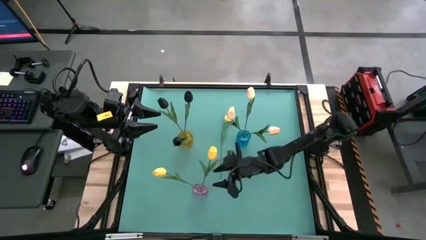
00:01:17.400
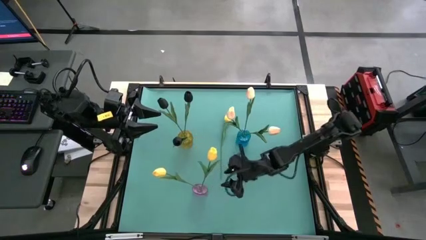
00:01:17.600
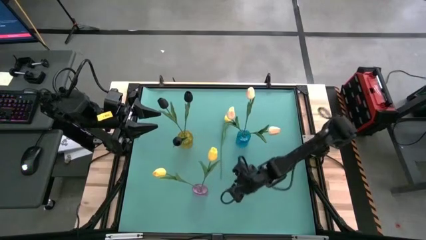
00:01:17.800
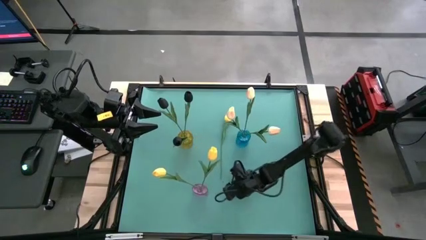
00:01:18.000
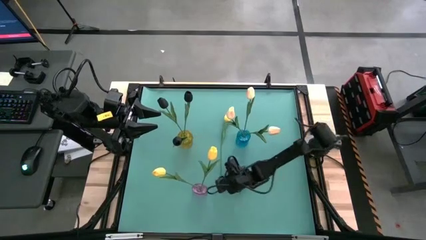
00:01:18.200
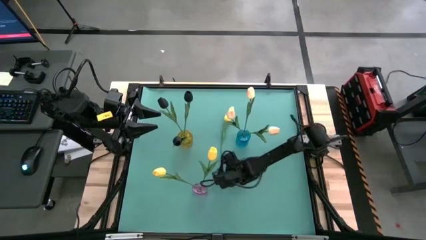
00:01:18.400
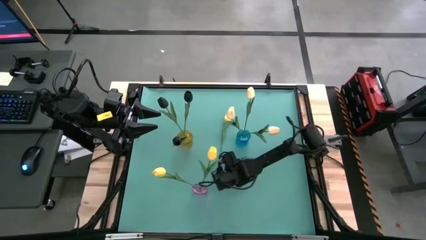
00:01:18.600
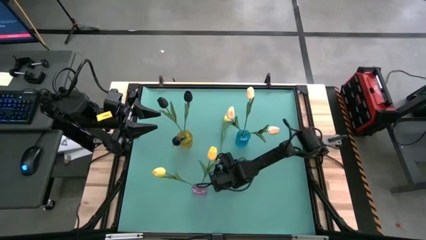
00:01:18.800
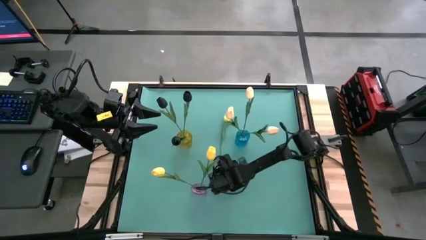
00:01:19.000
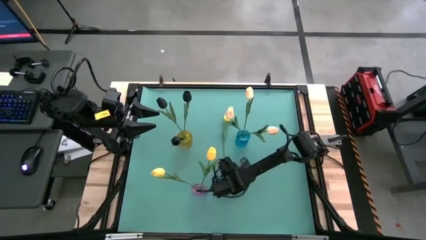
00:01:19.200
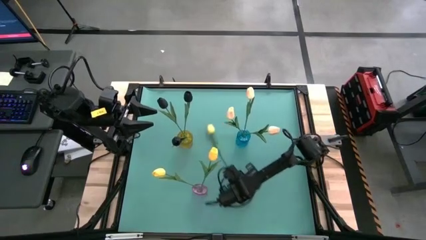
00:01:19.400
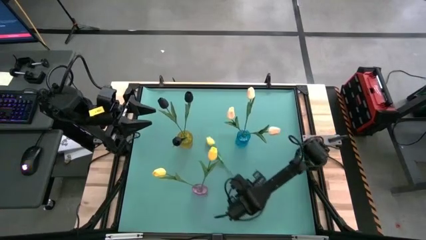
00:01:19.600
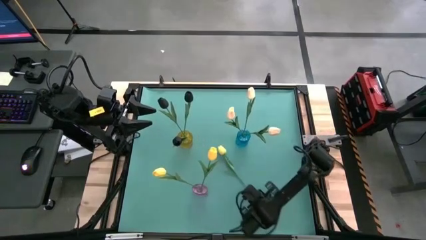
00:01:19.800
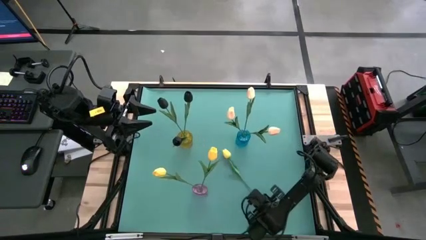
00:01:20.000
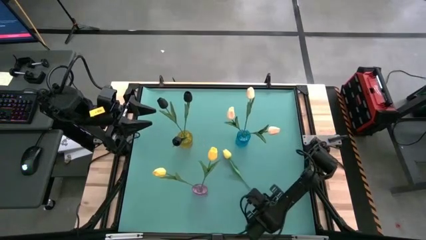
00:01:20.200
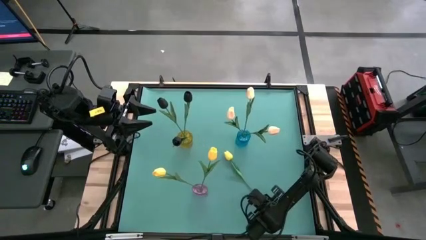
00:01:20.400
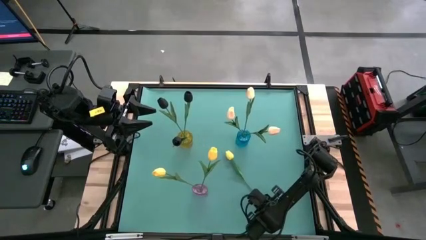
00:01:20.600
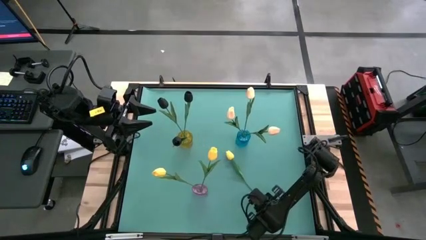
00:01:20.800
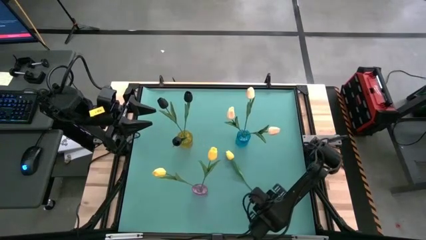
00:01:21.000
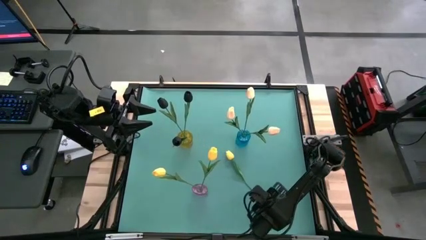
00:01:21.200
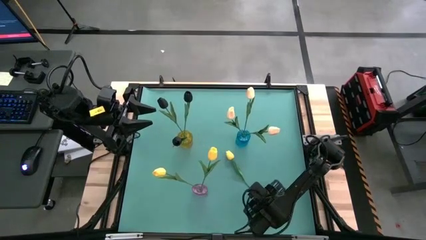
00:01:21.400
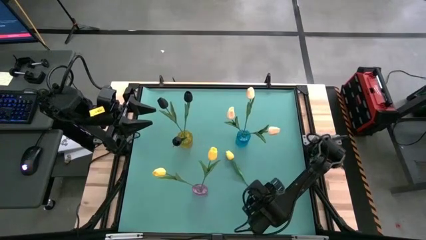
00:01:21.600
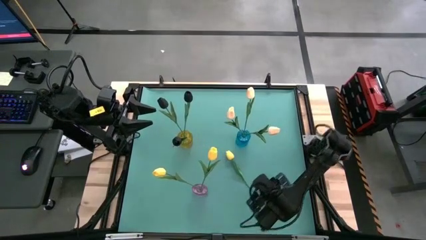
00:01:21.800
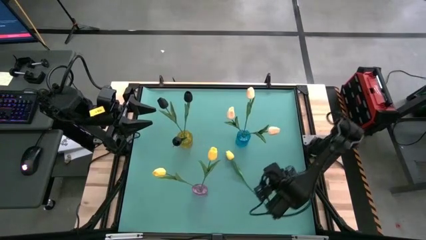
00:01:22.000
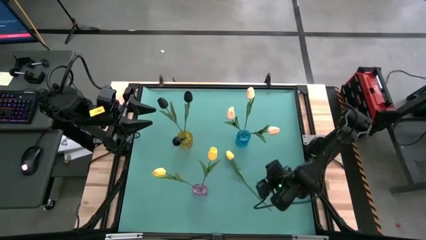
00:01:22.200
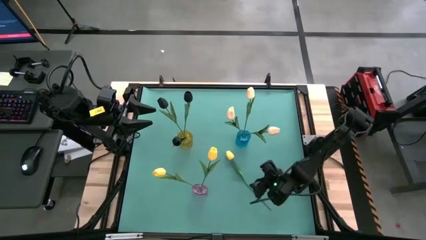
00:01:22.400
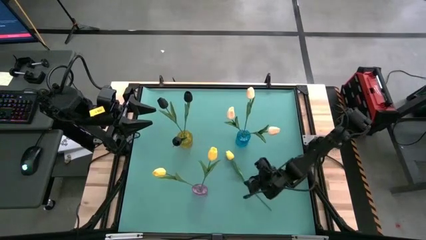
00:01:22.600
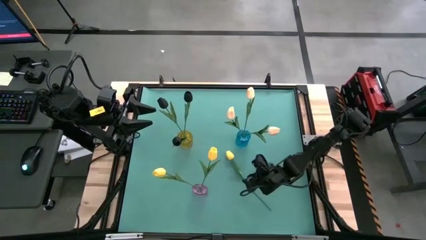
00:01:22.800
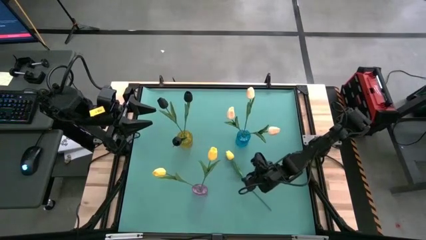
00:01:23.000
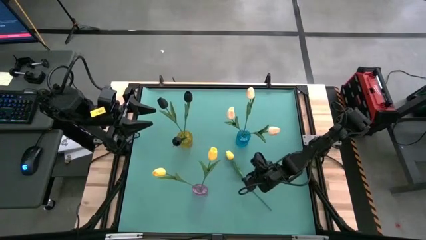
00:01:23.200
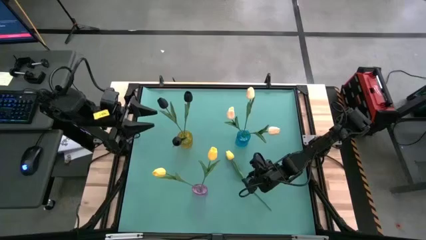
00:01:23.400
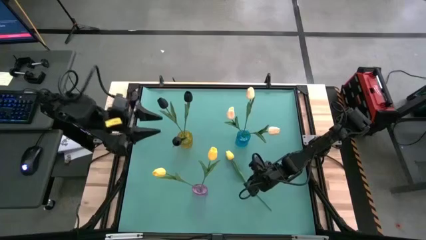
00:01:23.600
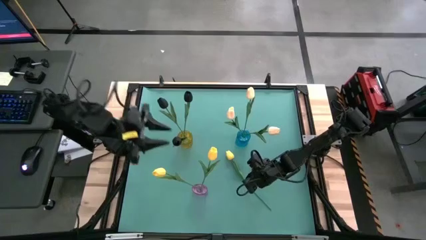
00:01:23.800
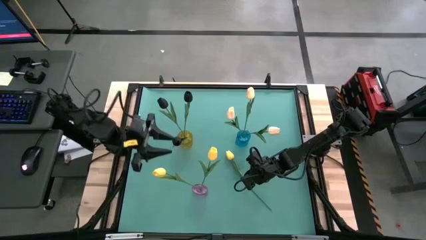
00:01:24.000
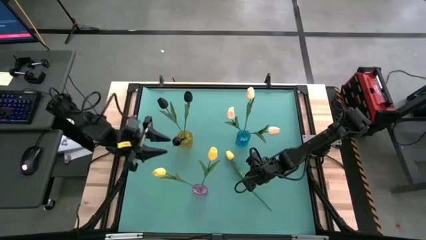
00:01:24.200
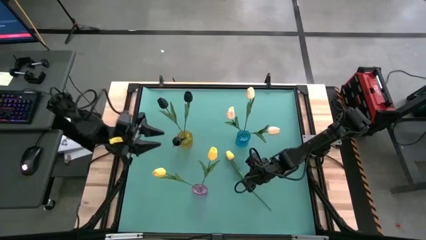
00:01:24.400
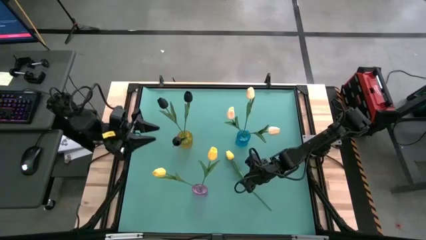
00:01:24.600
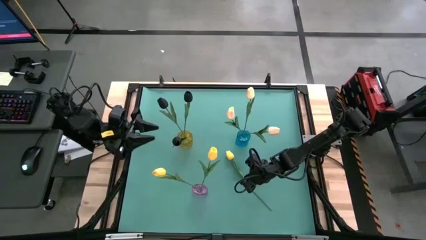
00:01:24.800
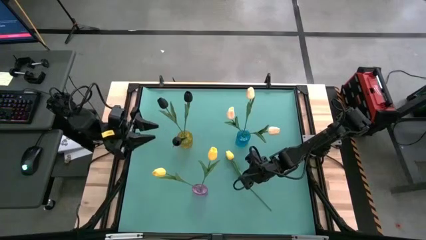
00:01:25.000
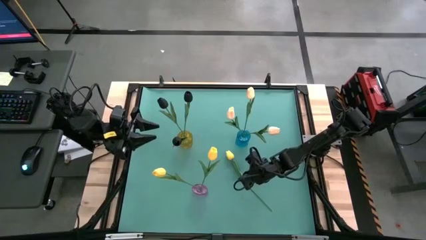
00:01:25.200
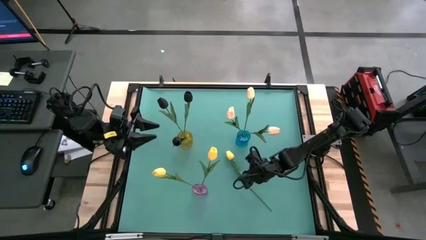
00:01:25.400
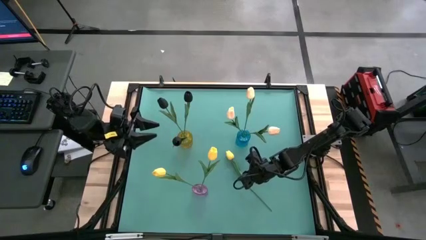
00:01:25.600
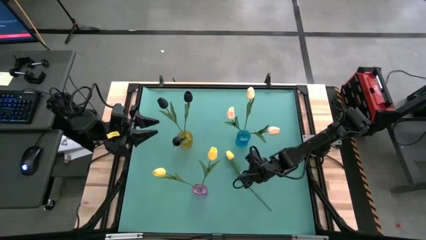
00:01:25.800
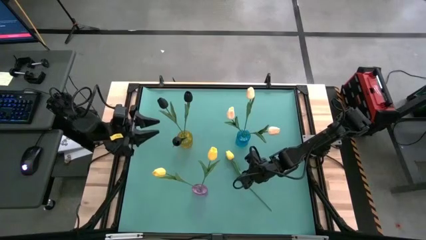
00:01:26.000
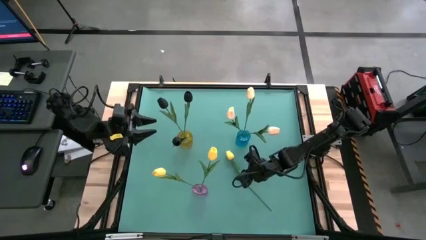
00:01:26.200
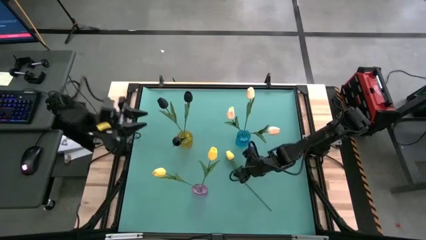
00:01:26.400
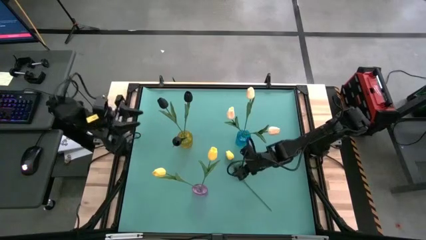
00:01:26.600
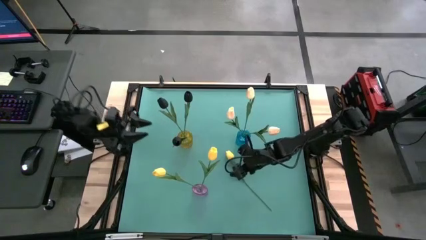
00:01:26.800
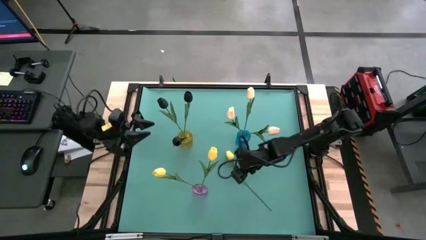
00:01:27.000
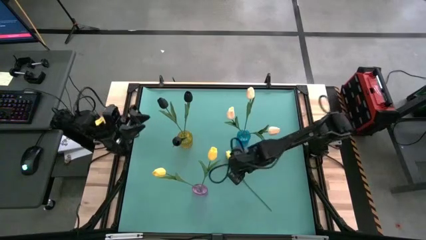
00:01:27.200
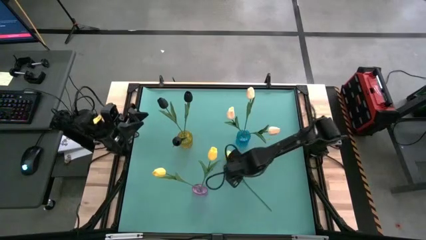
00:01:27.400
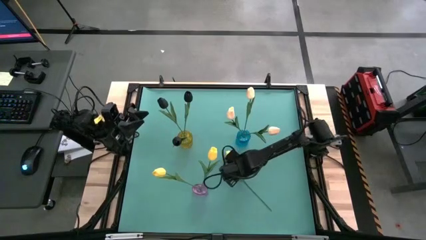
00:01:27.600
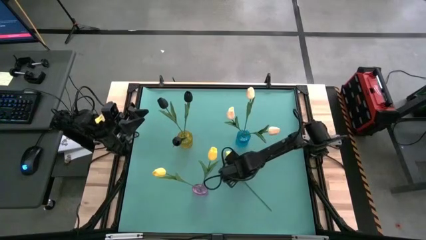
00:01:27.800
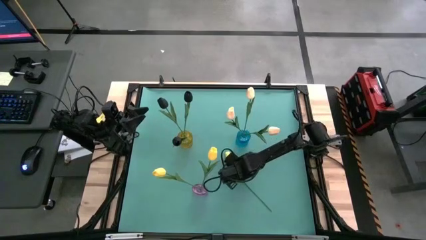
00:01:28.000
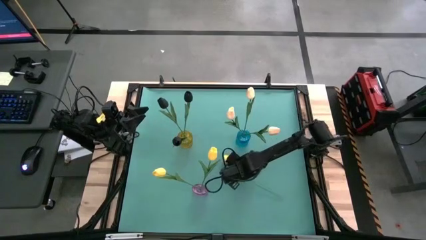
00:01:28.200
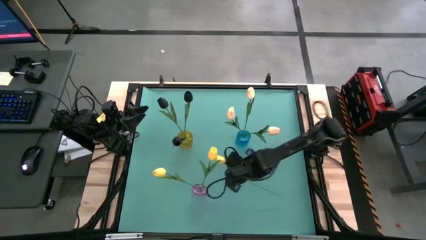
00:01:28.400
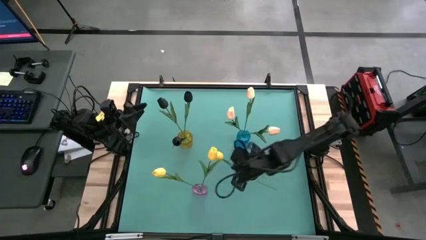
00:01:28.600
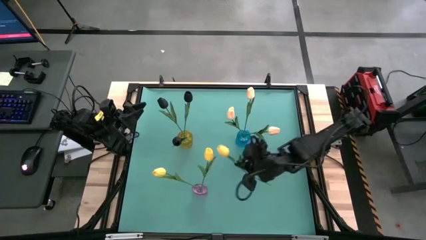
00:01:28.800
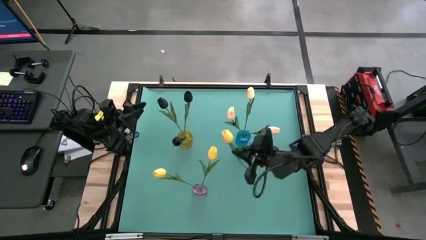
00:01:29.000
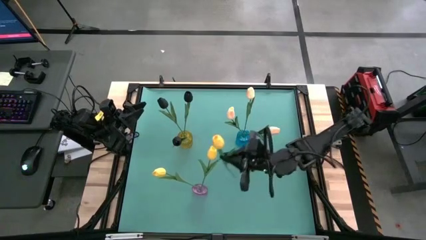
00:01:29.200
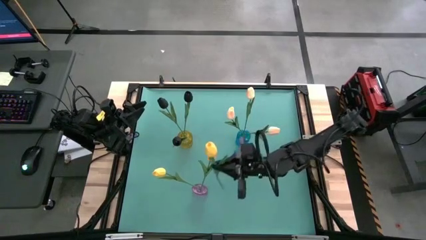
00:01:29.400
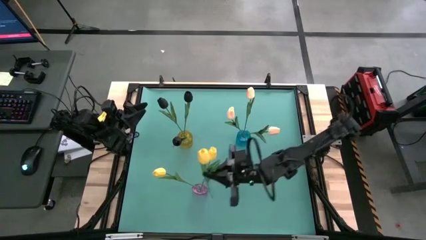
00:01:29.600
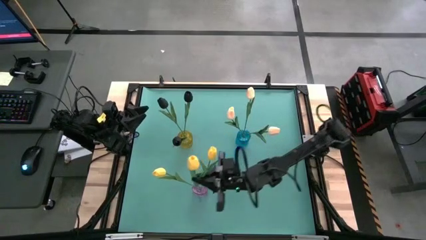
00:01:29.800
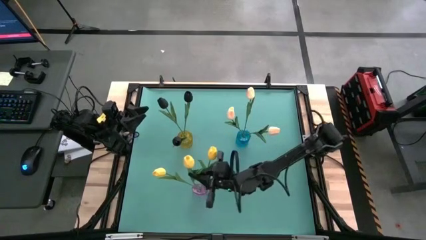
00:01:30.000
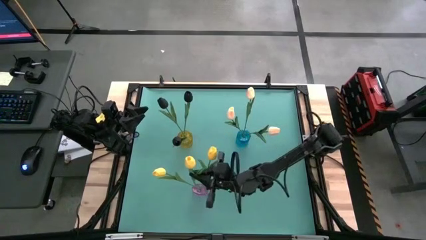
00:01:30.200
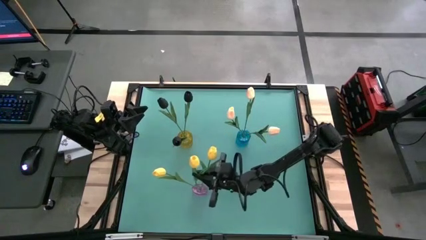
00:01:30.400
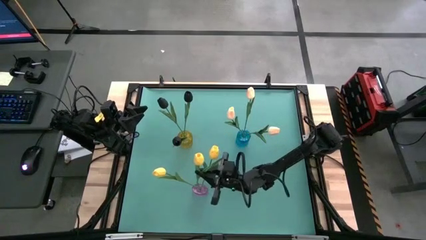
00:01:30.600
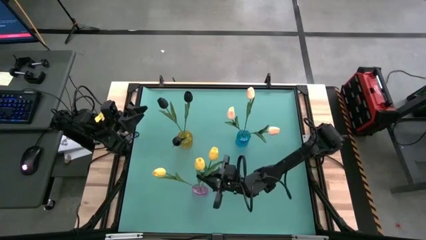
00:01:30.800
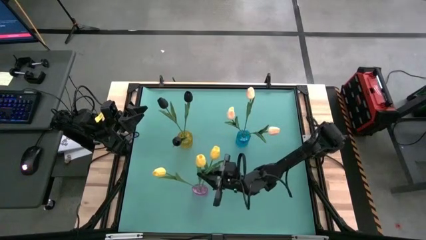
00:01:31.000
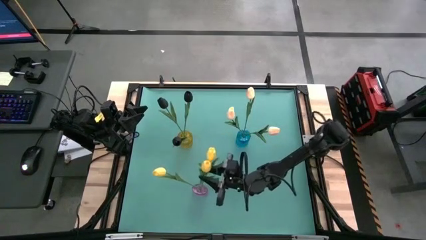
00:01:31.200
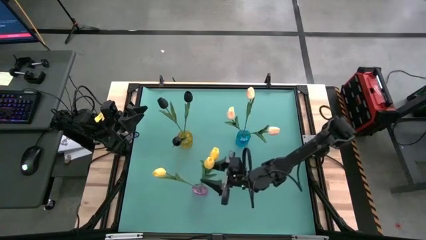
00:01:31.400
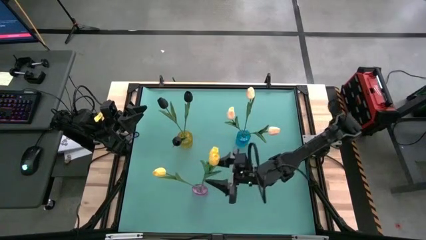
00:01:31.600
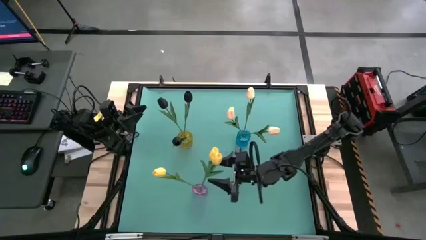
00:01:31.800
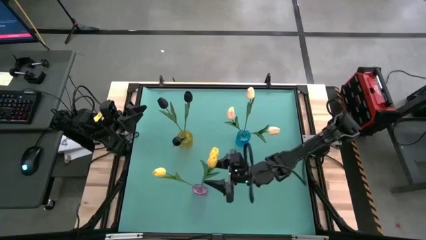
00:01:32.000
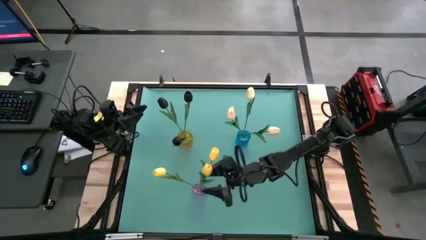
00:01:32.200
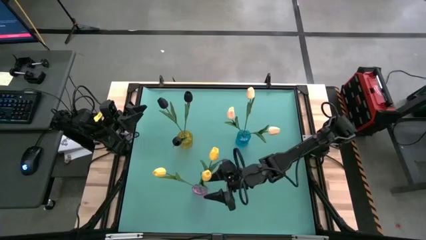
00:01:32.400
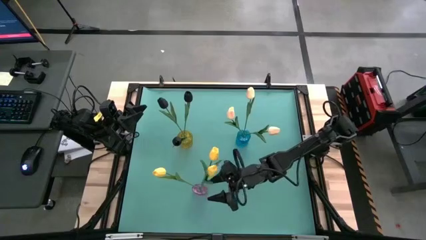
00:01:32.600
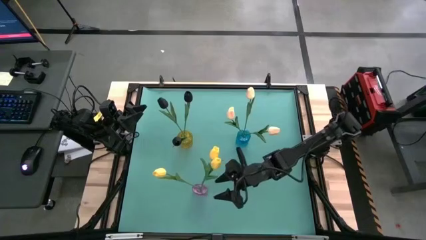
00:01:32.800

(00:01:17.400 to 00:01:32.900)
Task: Sort flowers into vase by color
Put the yellow tulip flower into the purple vase
